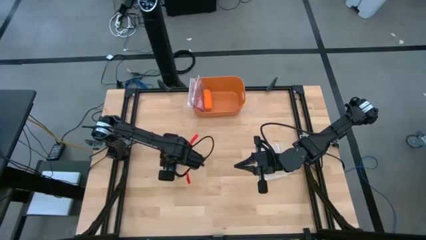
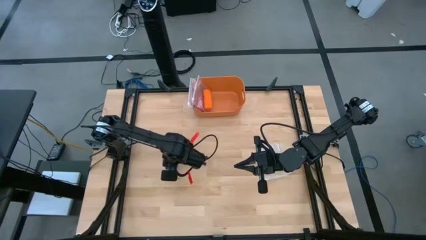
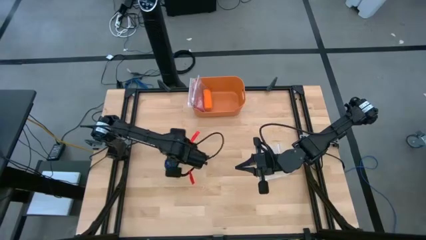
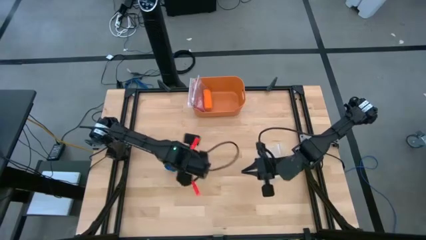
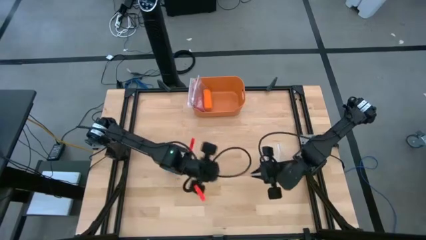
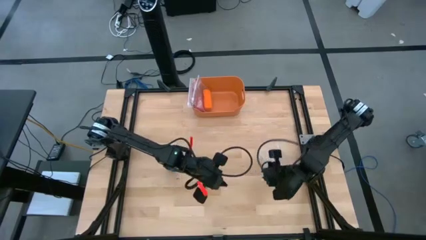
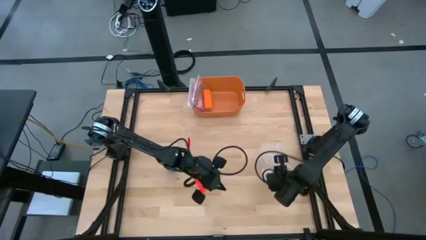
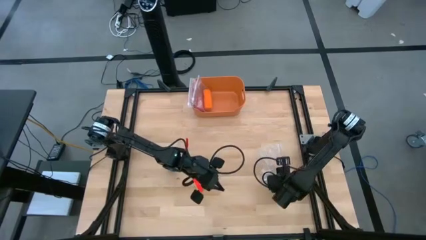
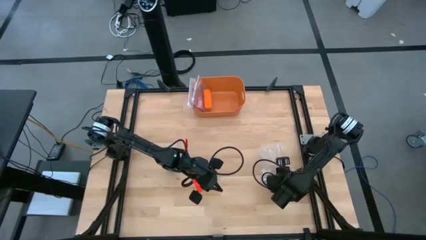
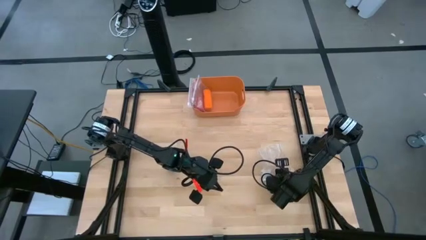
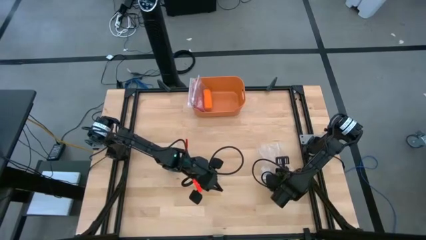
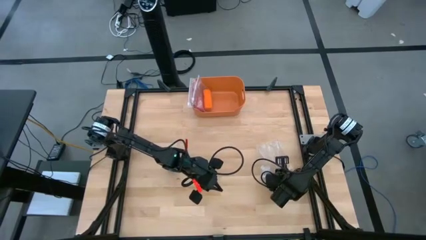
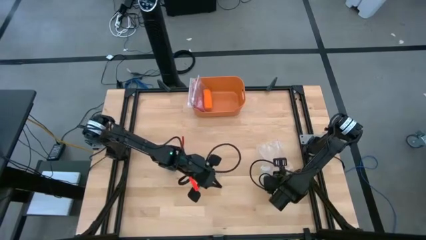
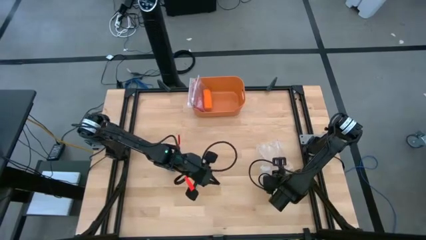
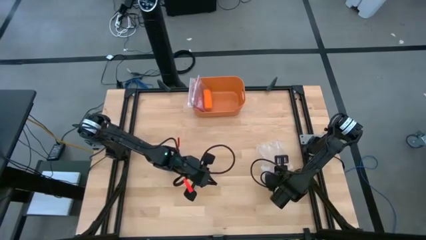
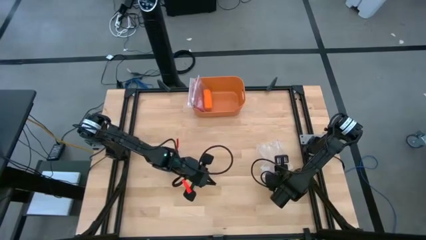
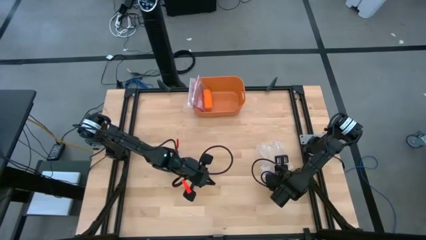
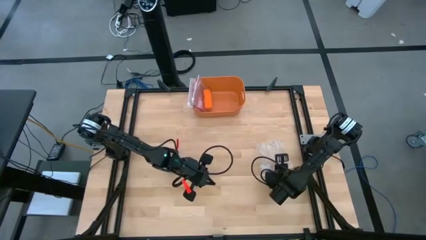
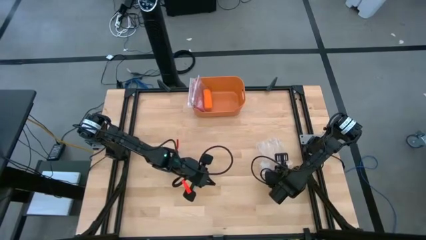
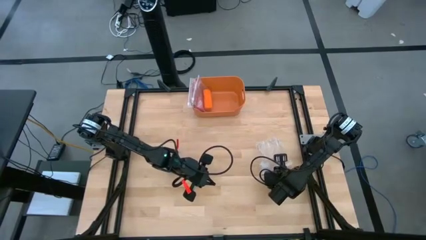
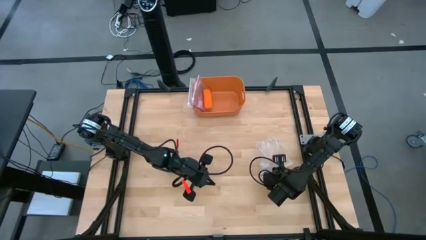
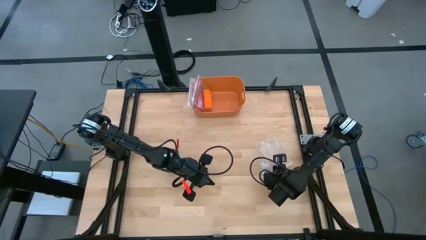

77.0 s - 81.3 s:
Task: Roll bandage
Open the transparent zip bag

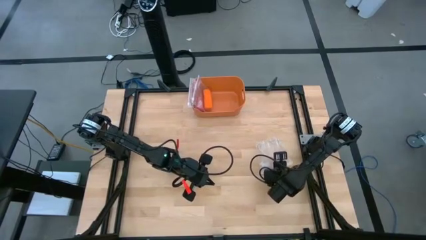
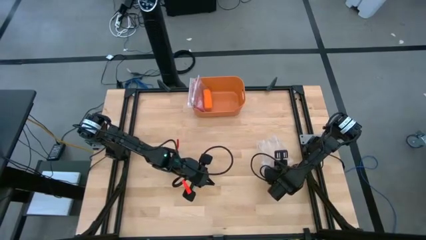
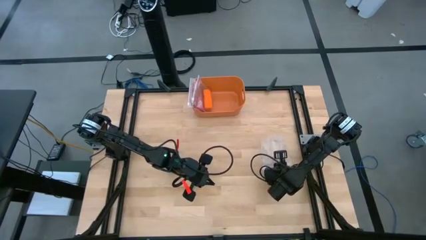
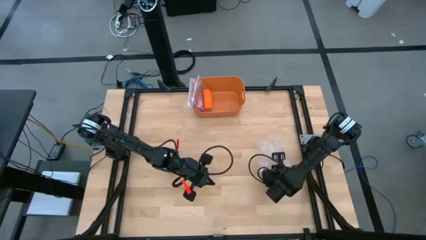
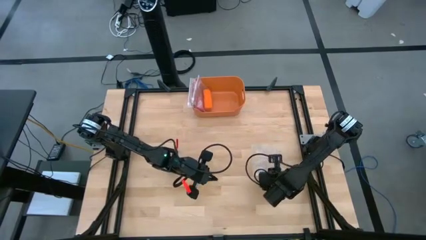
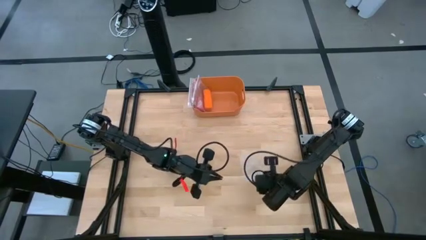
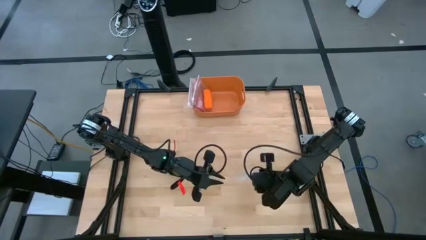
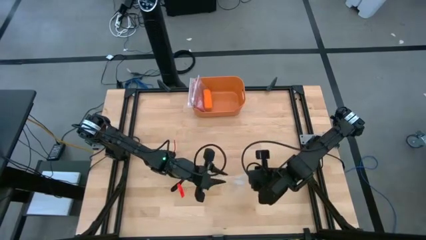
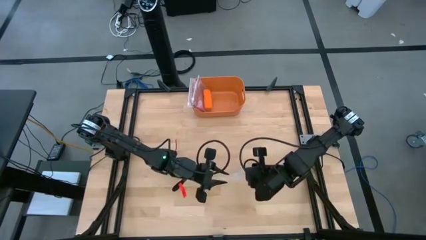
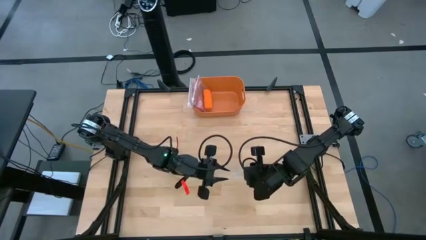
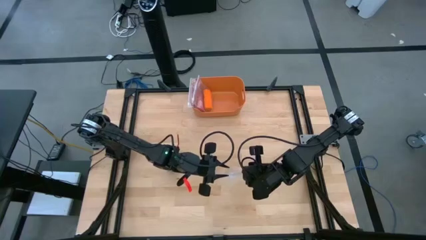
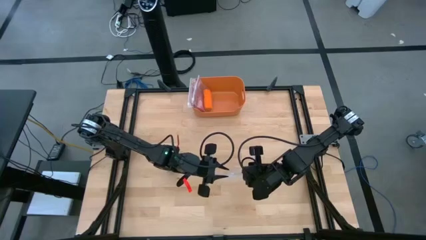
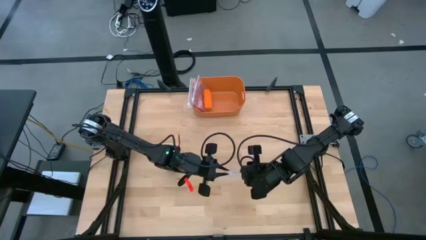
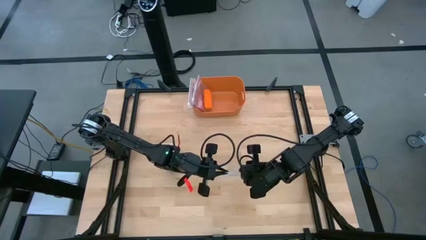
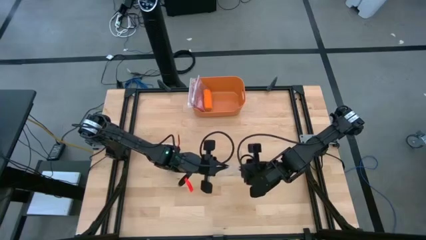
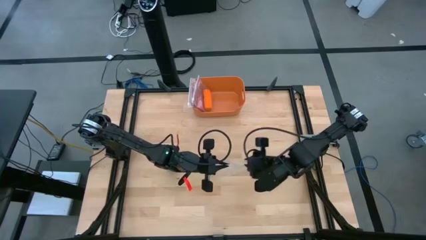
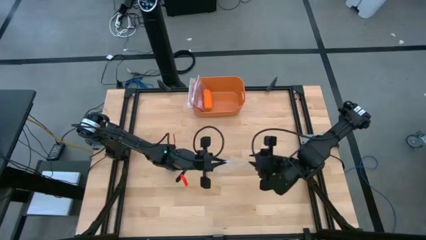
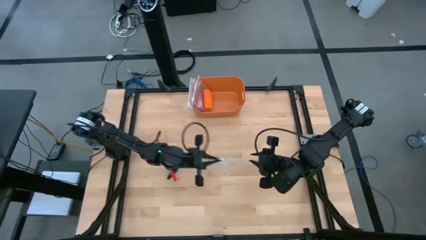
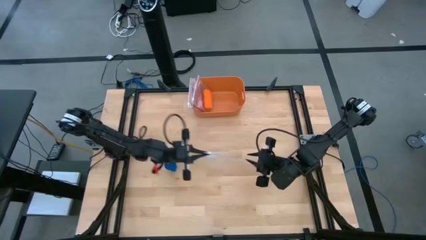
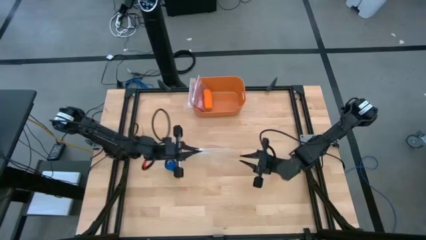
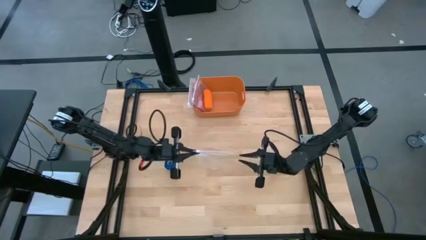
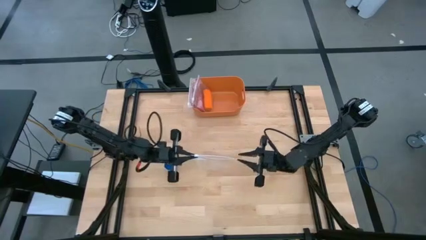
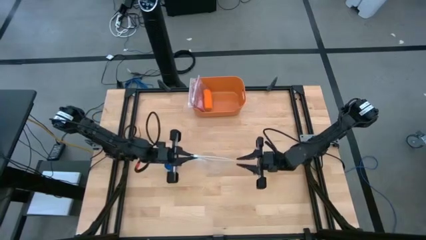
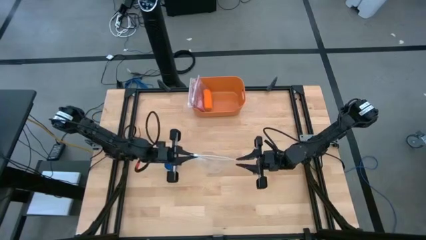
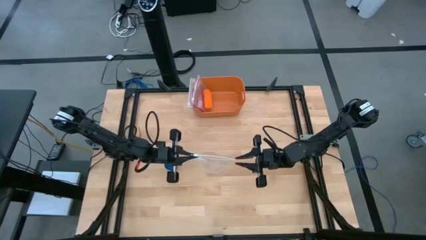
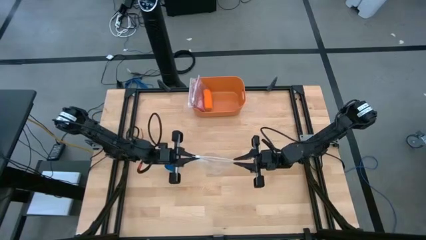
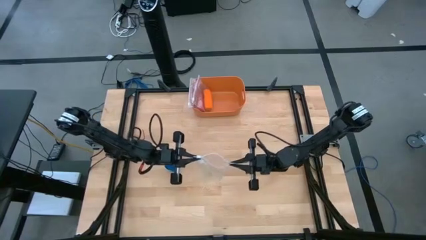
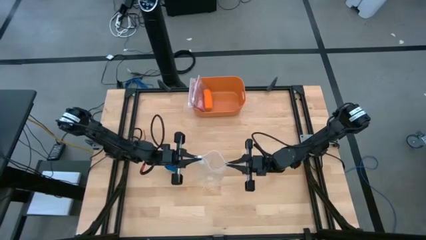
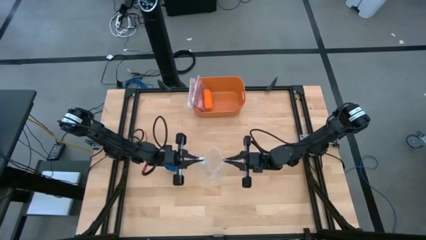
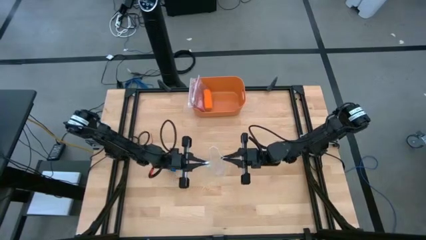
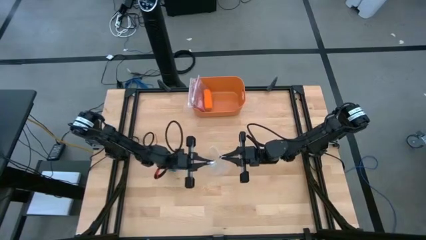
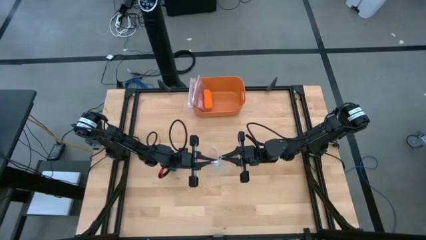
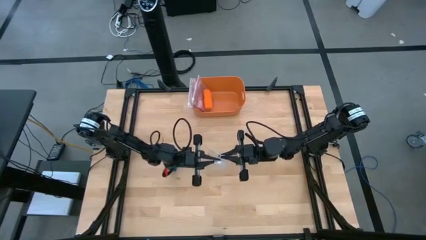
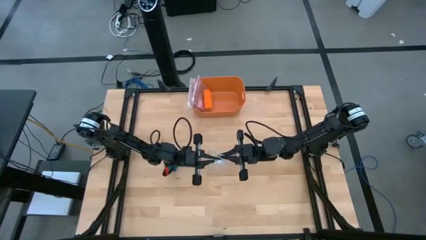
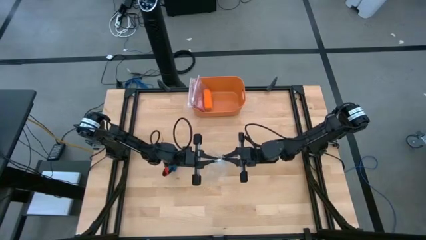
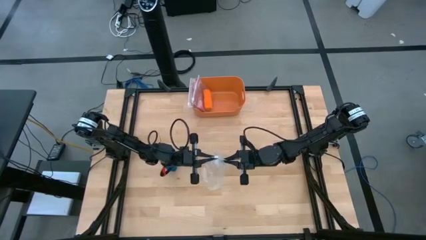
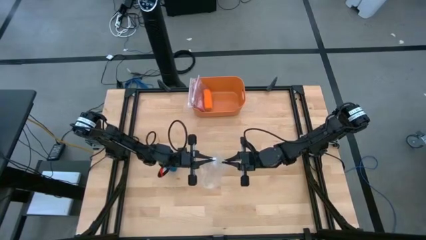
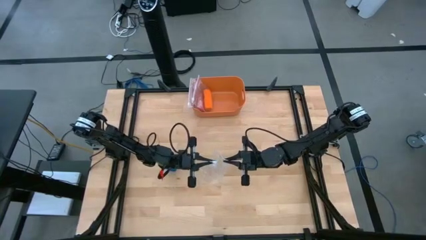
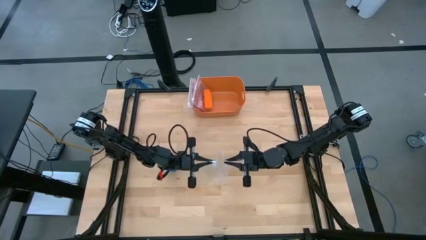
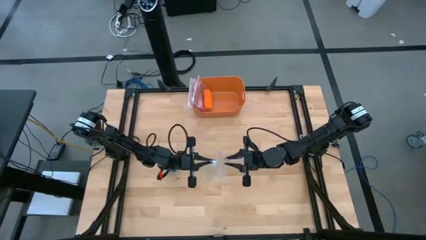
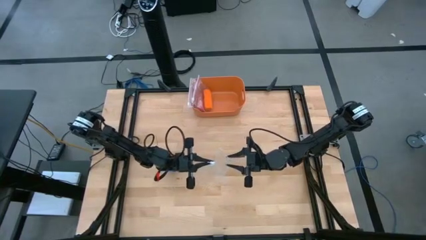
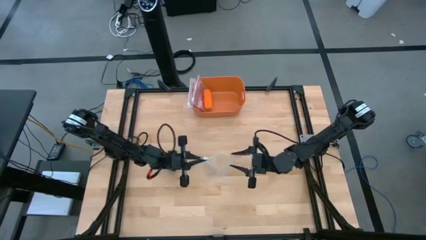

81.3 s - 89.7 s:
Open the transparent zip bag

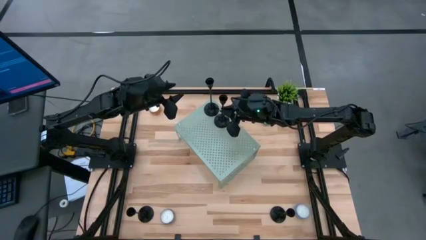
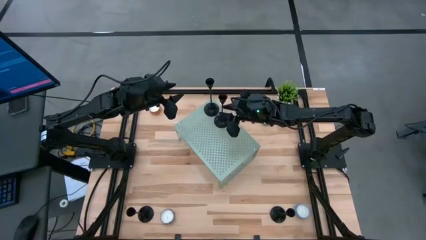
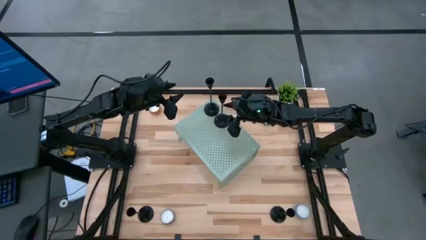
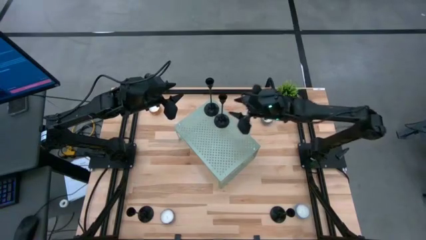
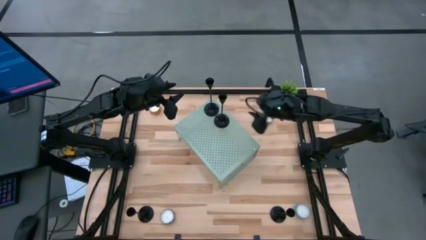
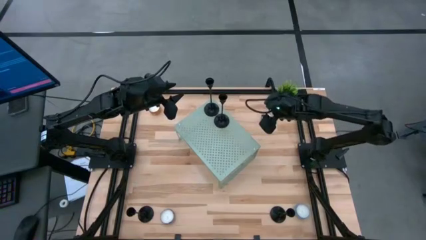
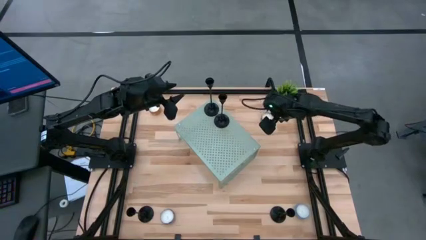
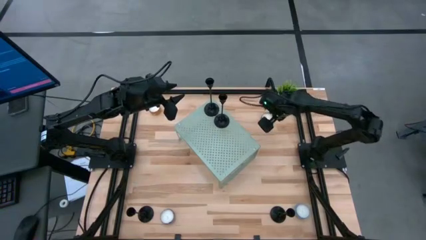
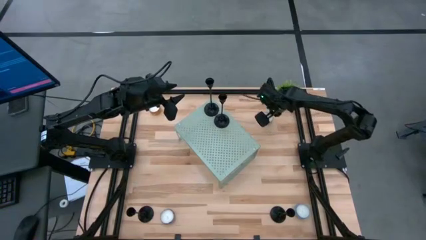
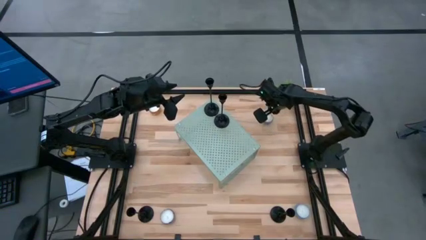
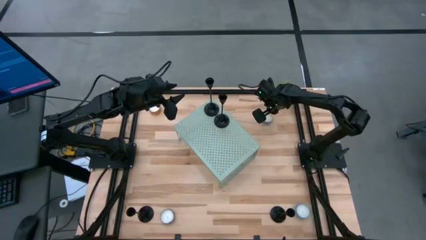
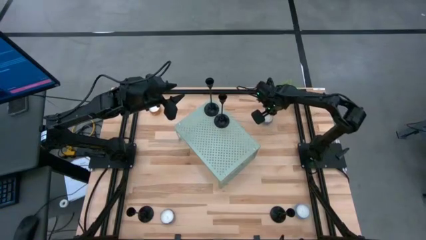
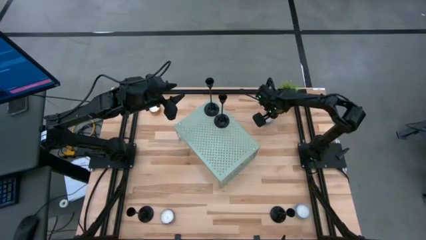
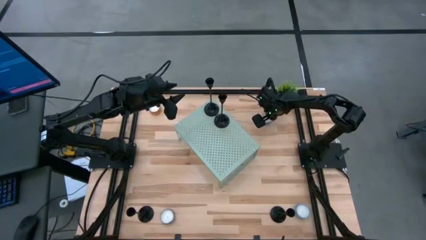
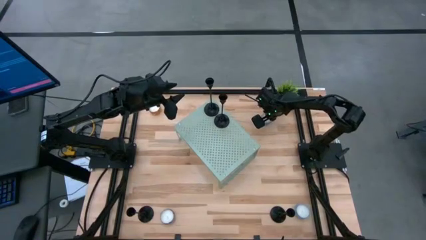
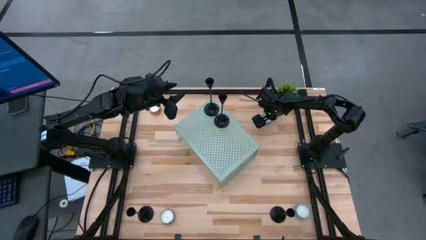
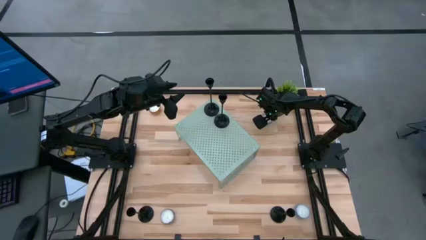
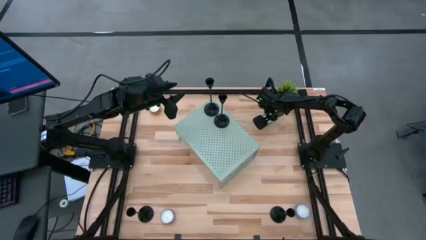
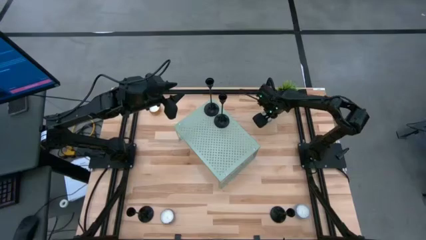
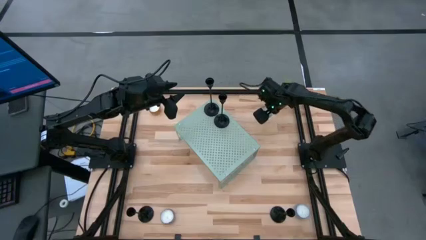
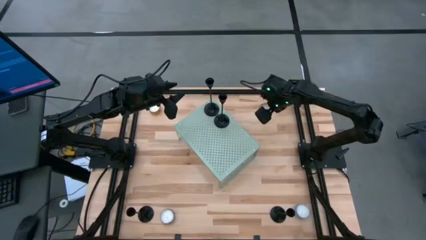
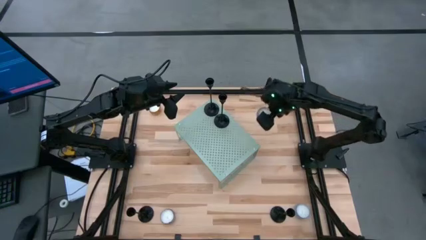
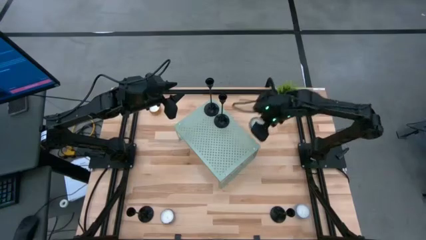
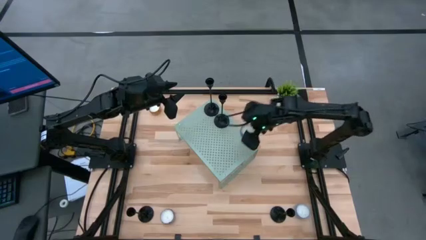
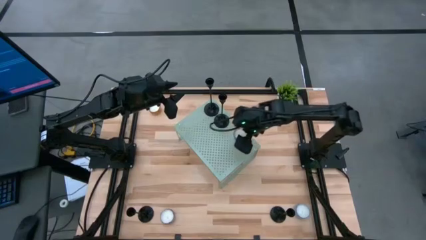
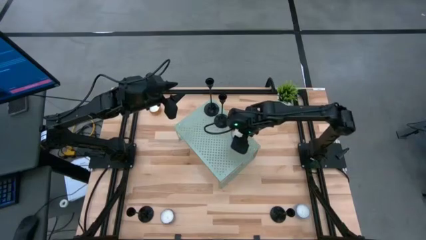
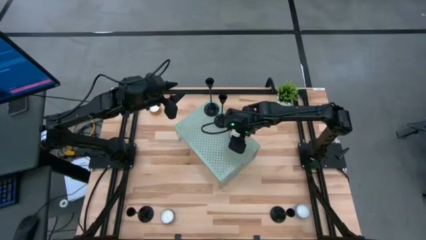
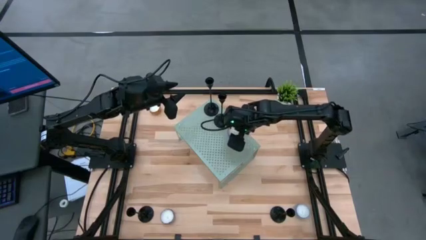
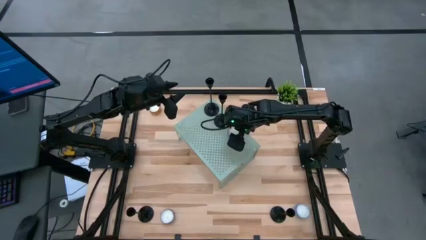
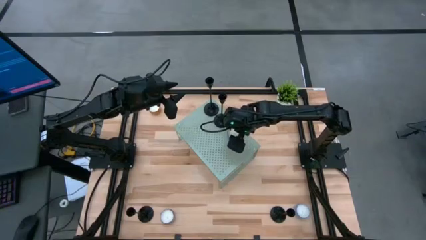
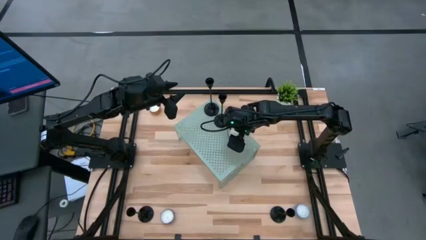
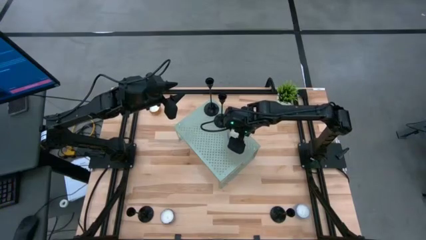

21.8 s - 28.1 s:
Task: Pick & Place candle stick holders
Put the top blue scented candle on the shelf
